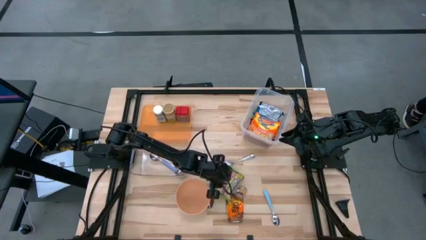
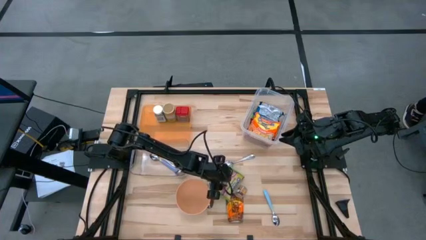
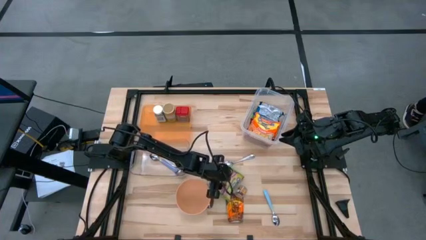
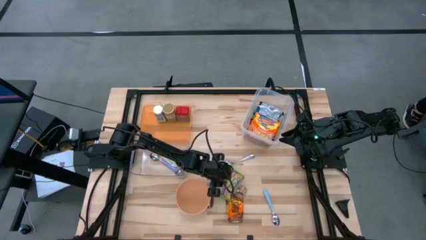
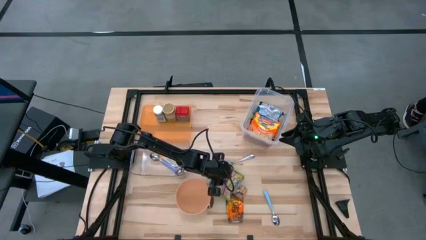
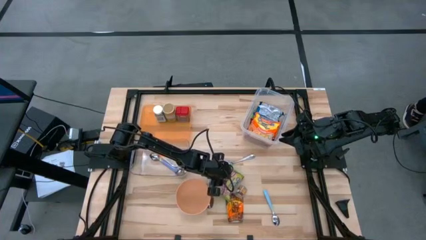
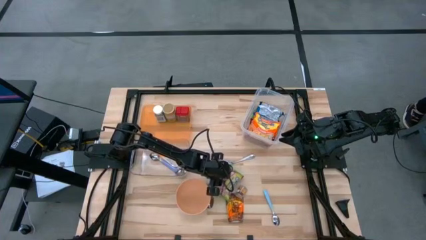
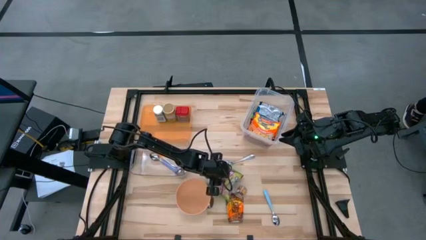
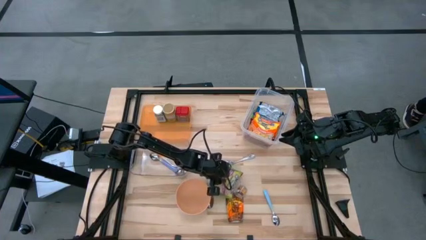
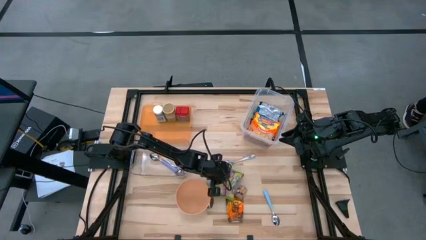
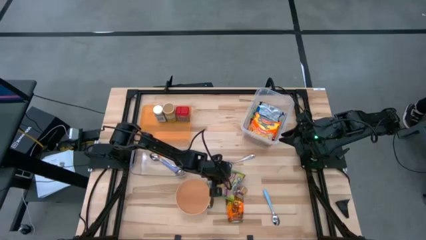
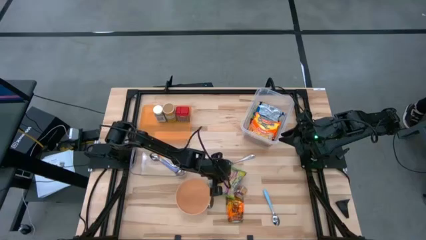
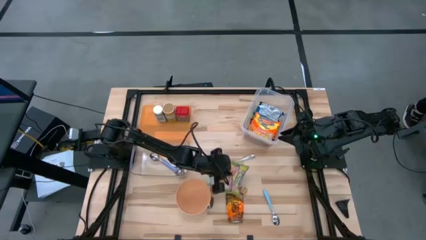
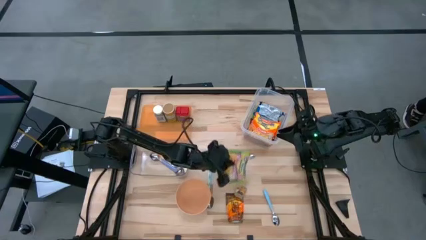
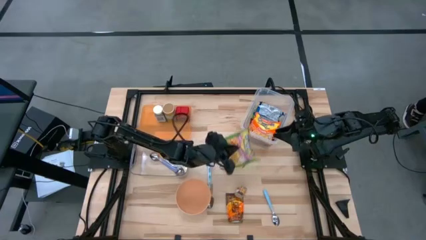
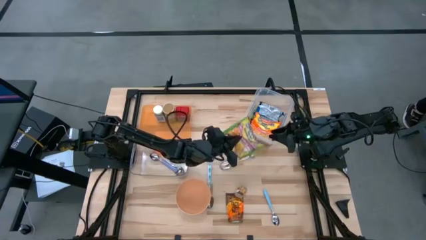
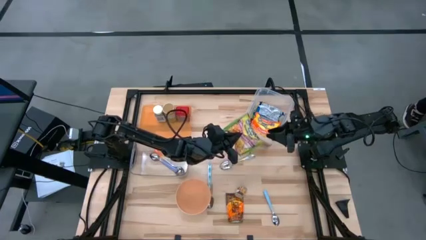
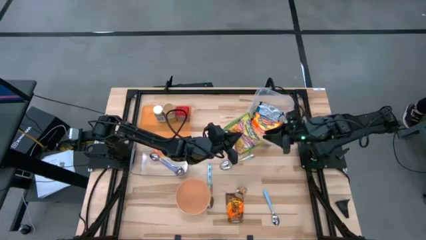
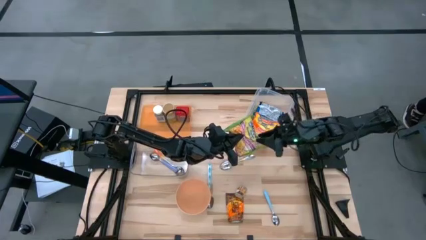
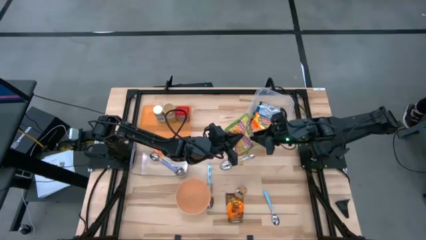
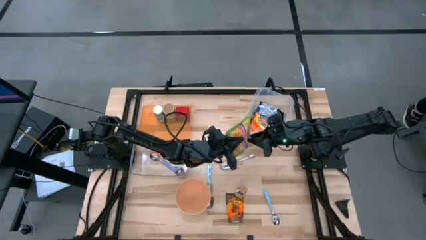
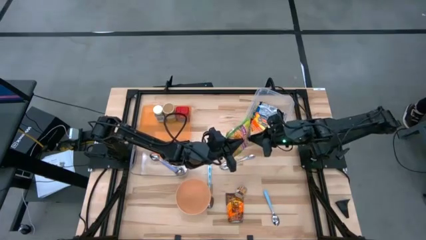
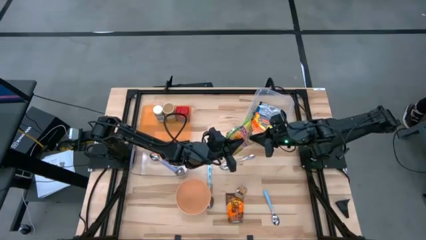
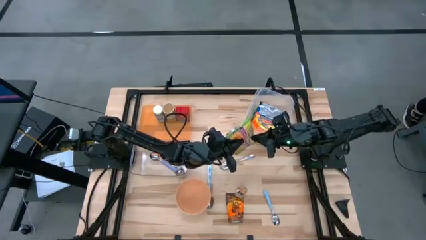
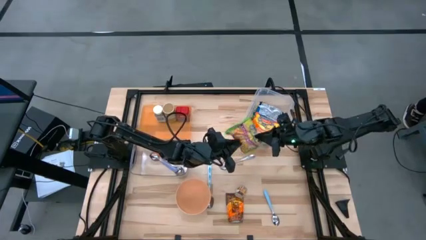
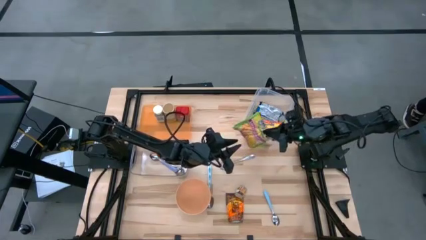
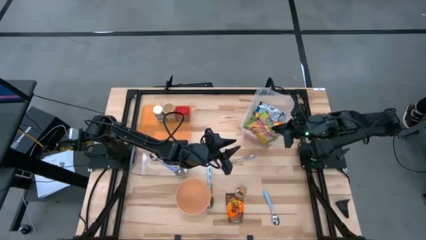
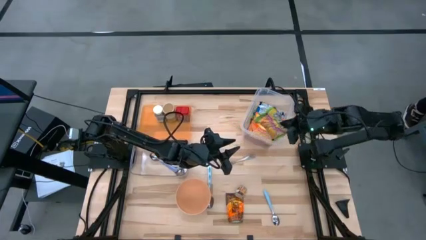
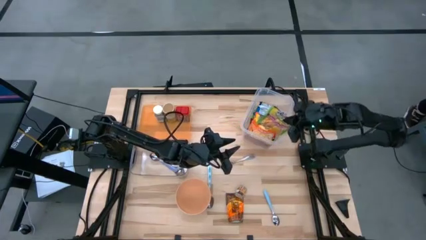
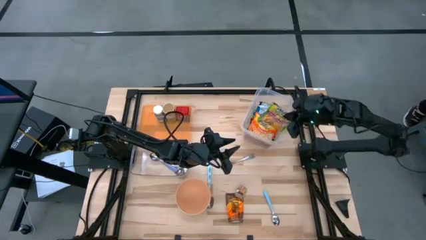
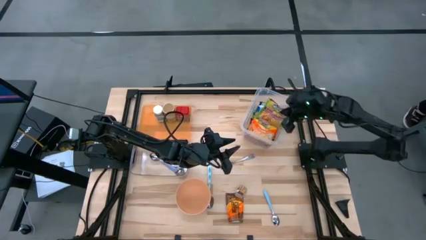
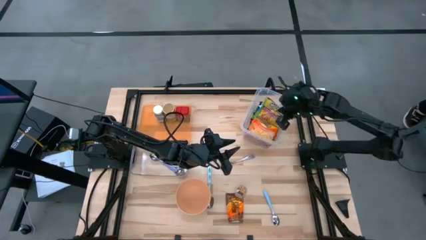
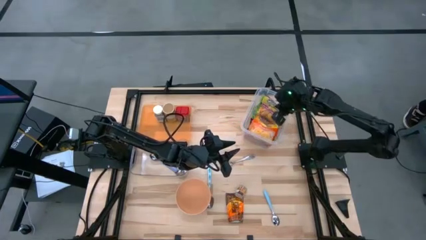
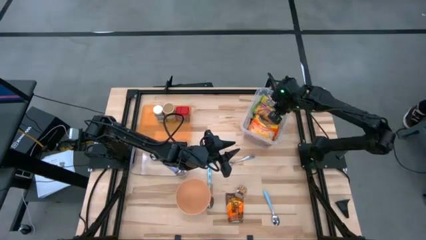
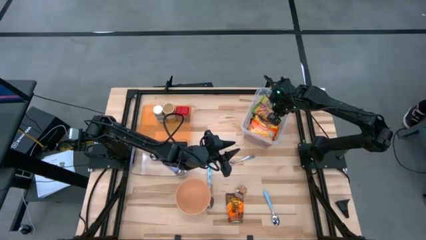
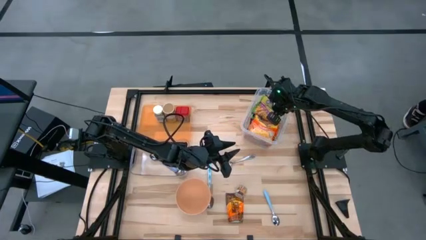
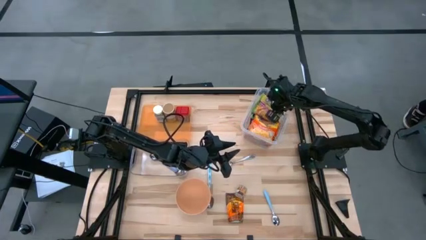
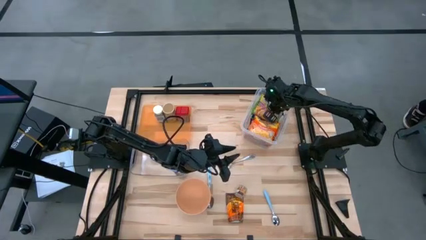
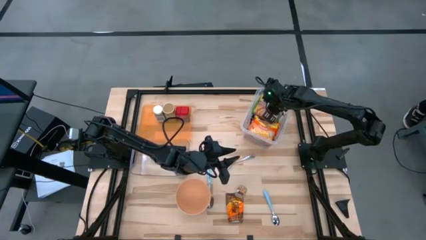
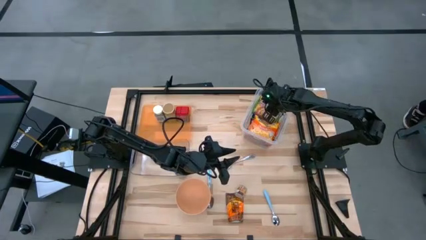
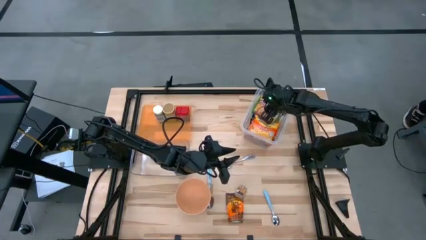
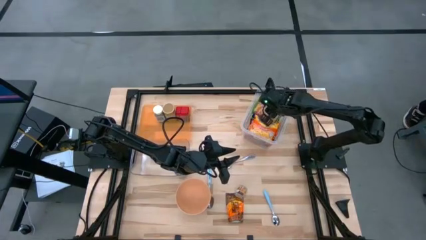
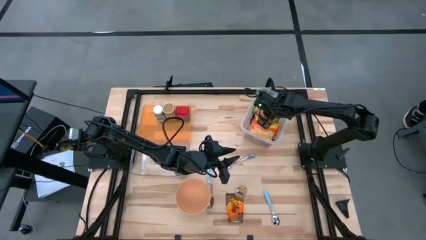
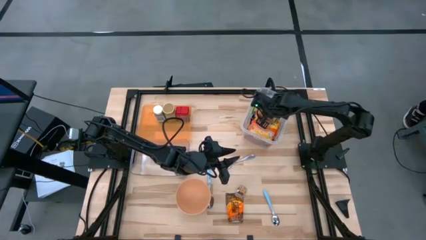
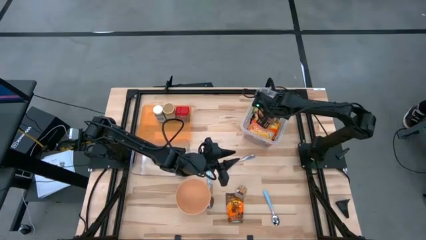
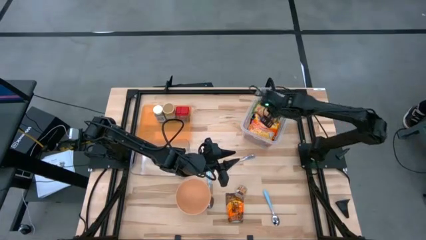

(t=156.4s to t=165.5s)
Task: Pick & Place Food Item
Put the green noodle pack into the top transparent bin

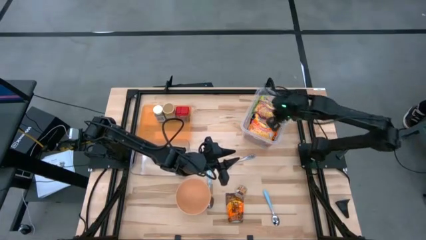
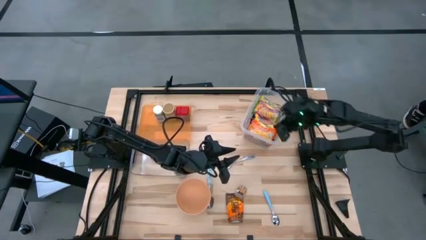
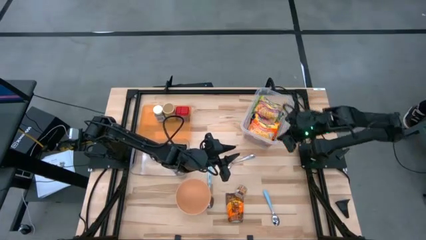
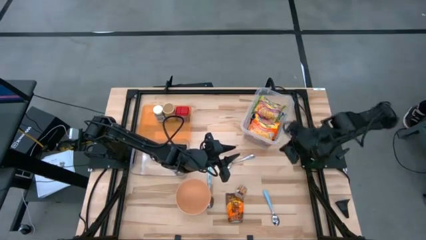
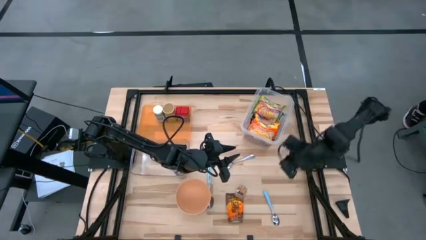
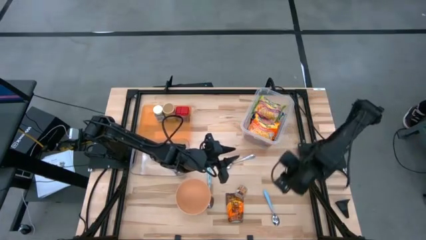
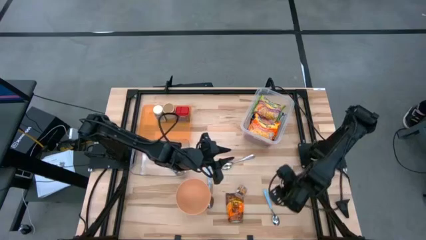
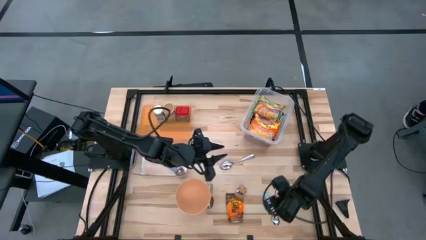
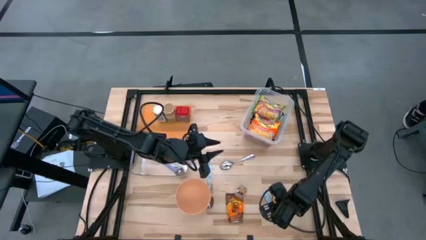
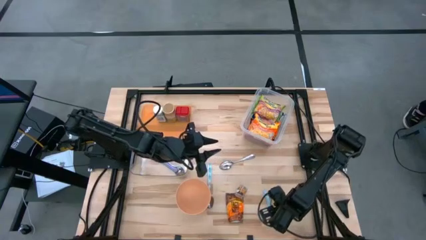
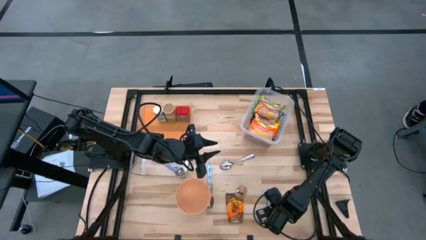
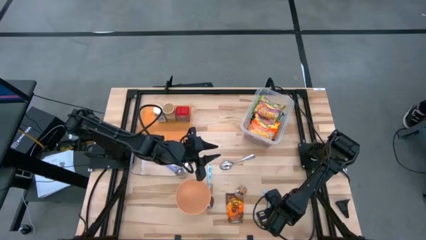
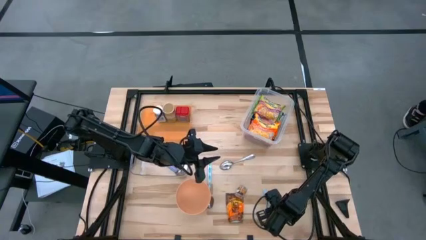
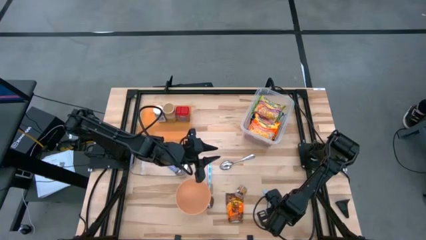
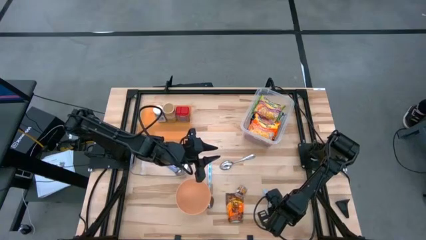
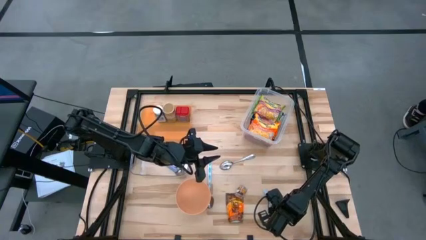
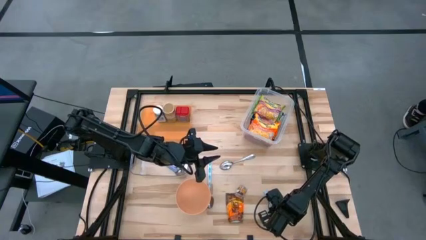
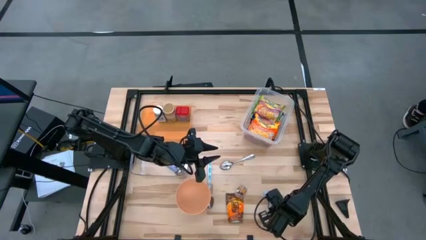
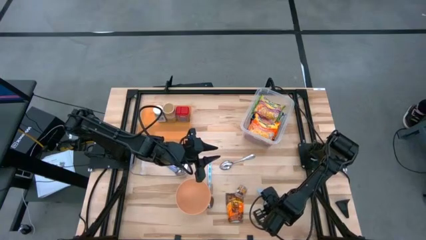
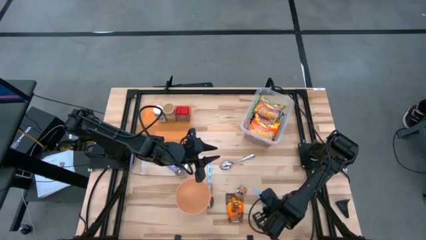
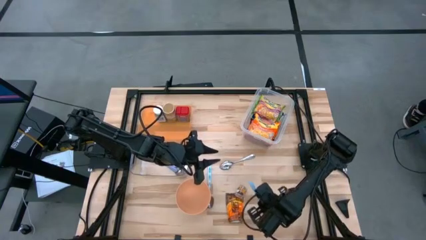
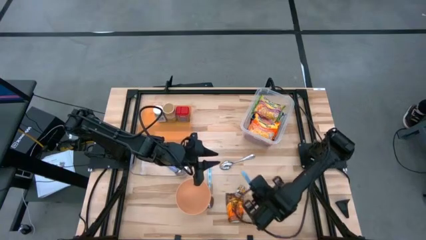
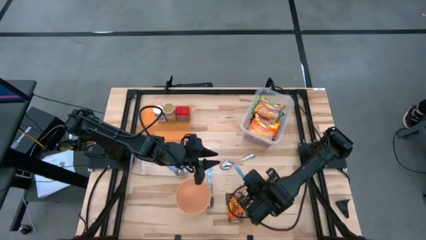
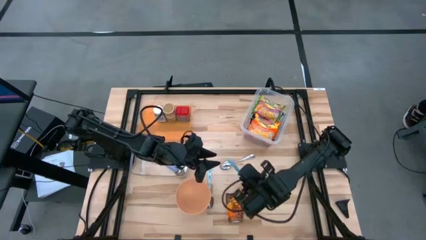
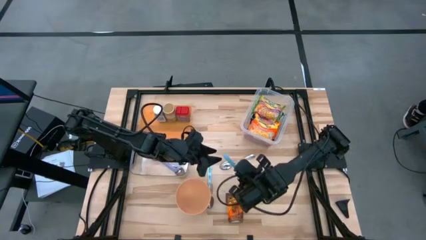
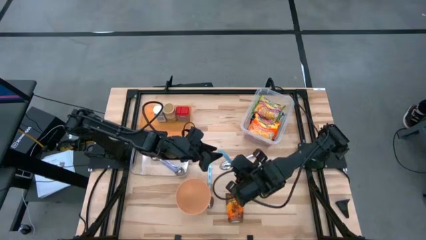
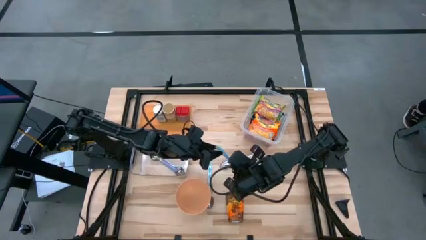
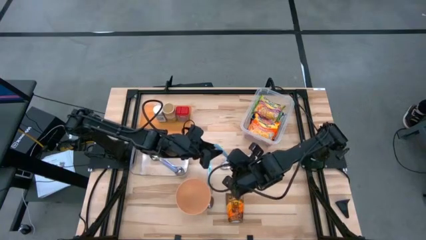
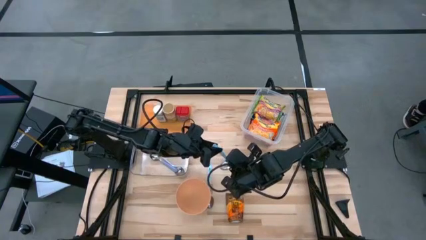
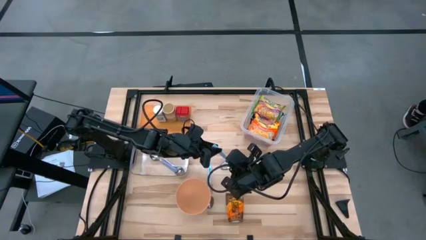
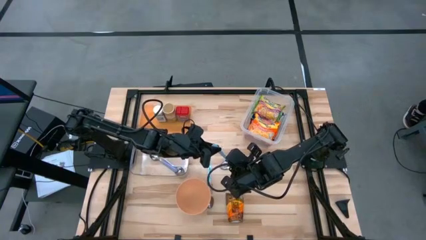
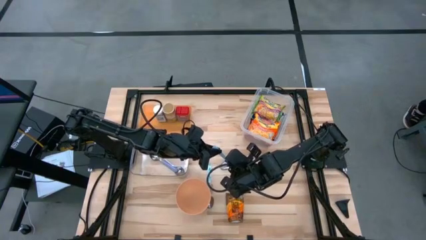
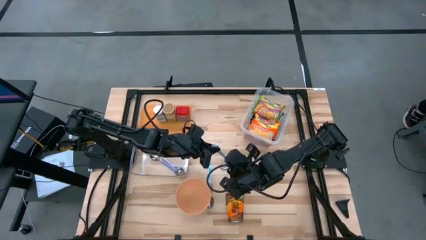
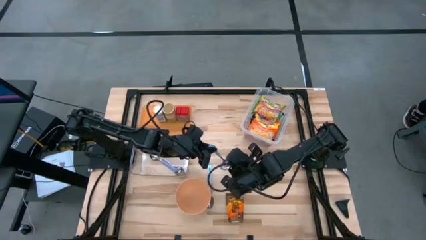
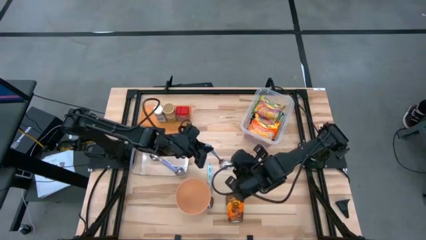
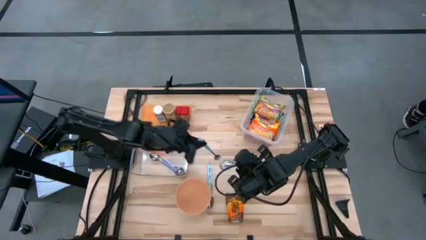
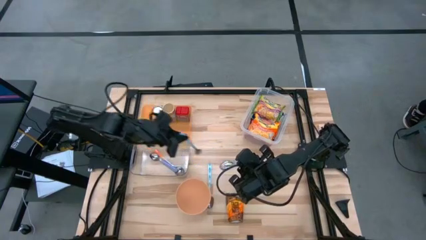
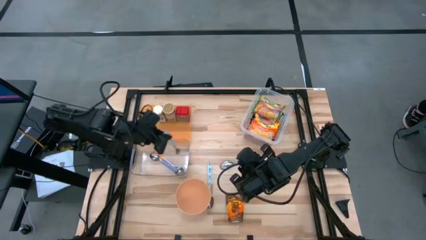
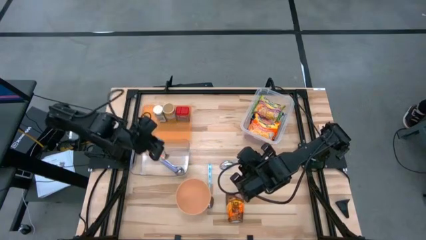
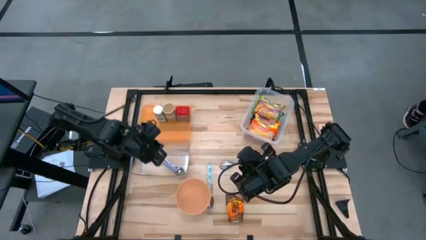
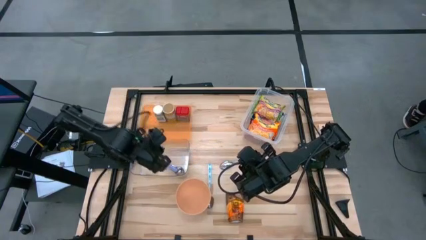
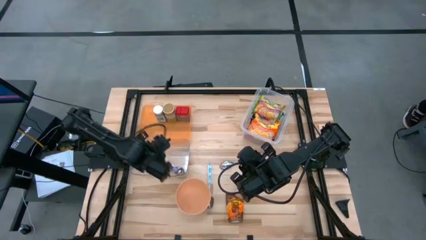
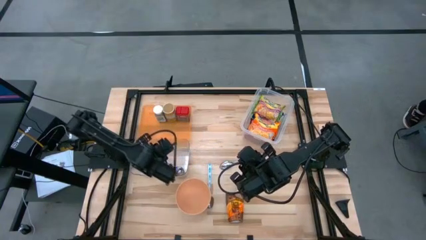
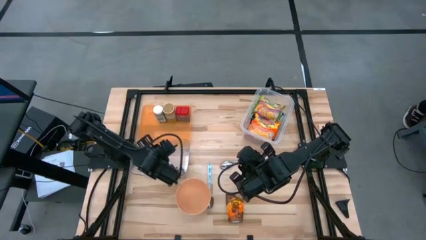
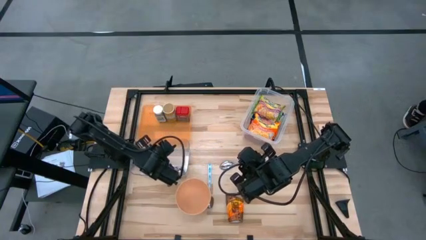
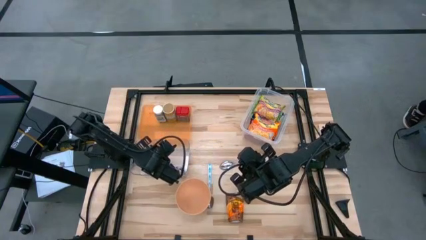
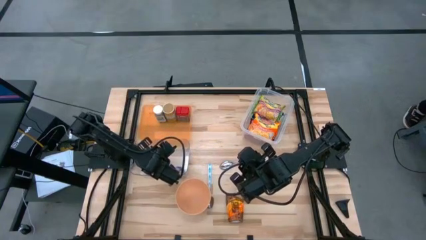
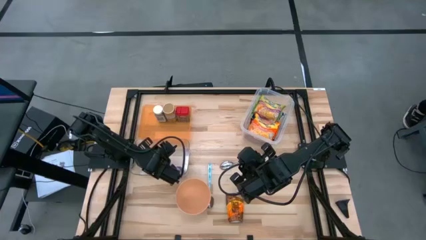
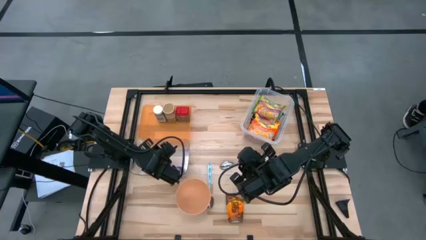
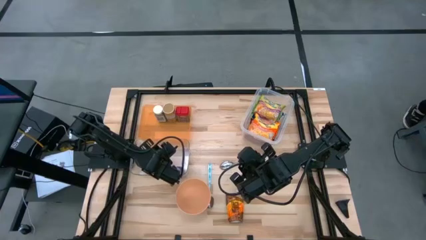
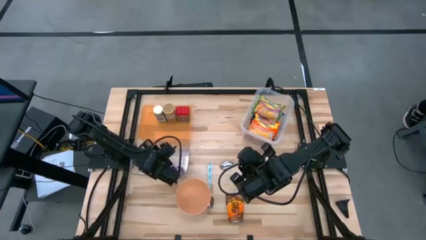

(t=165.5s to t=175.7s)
Put the blue spoon into the bottom transparent bin
